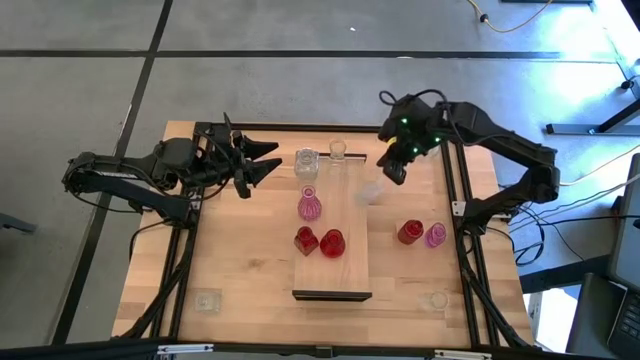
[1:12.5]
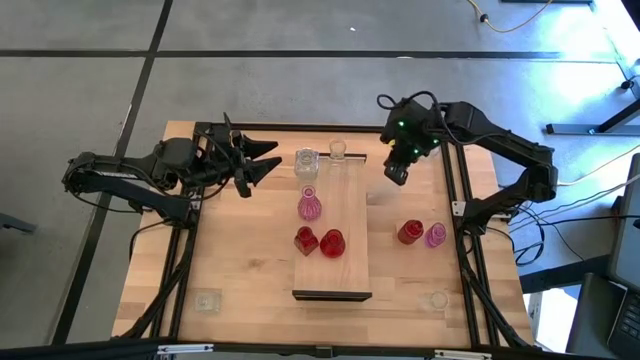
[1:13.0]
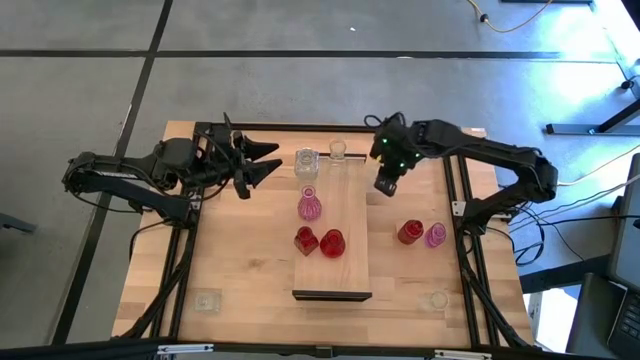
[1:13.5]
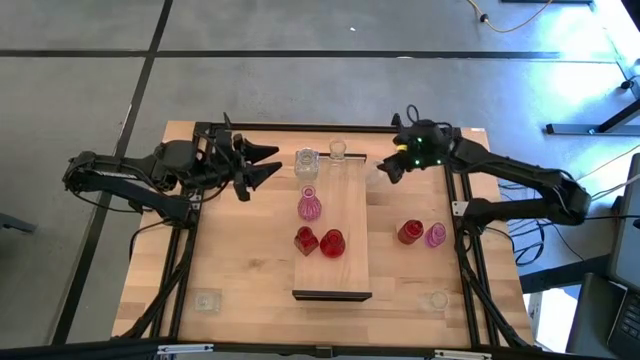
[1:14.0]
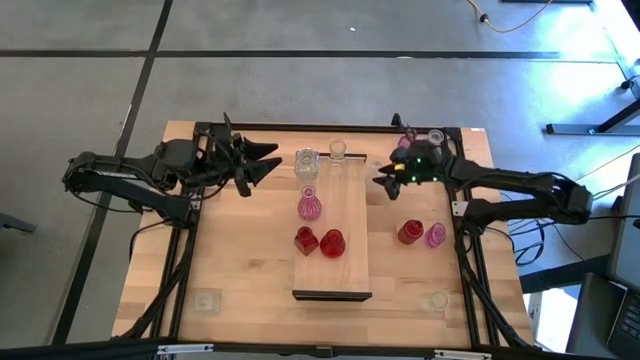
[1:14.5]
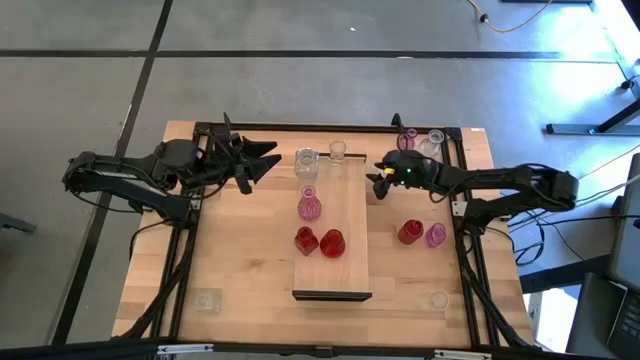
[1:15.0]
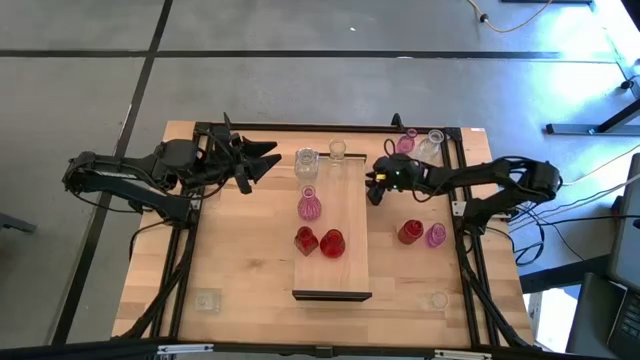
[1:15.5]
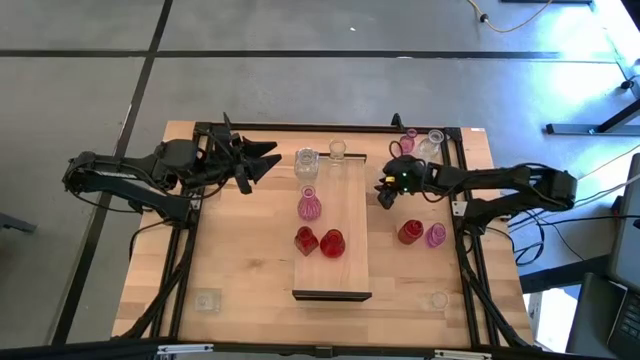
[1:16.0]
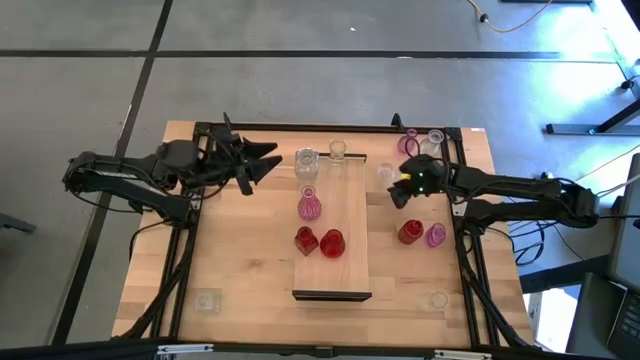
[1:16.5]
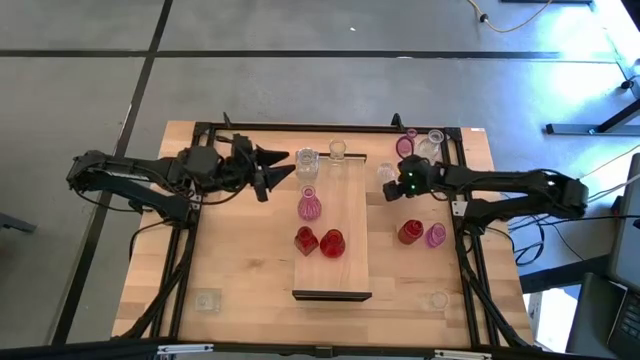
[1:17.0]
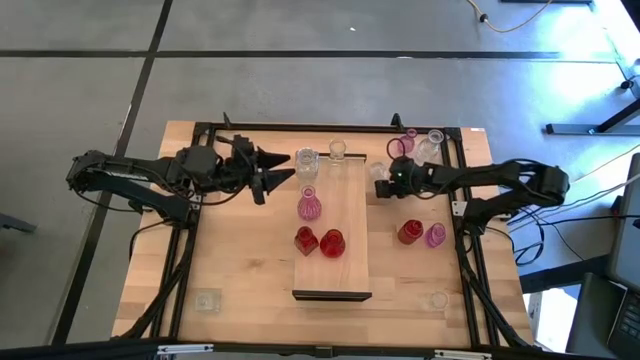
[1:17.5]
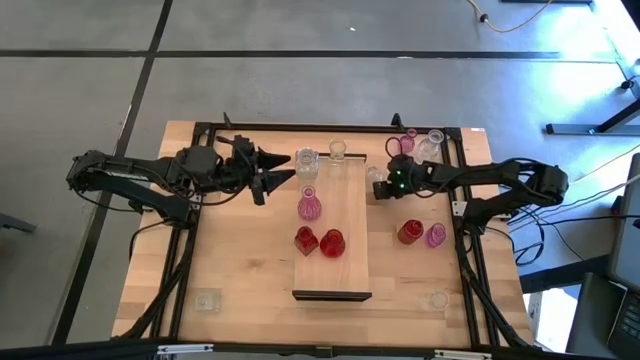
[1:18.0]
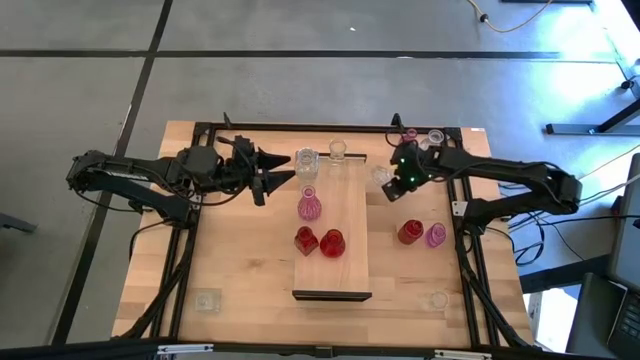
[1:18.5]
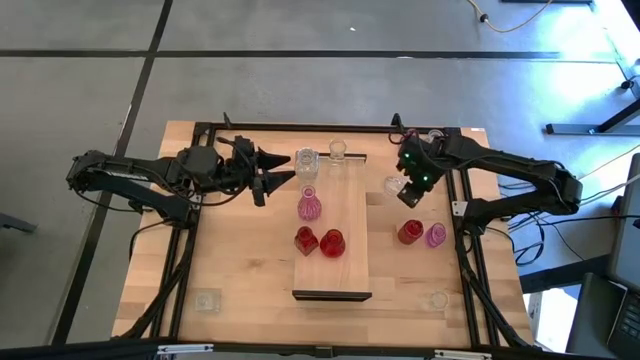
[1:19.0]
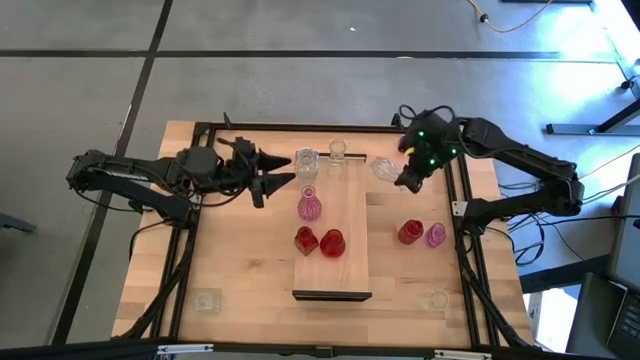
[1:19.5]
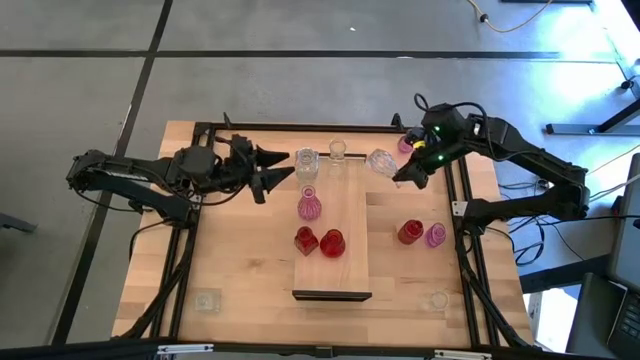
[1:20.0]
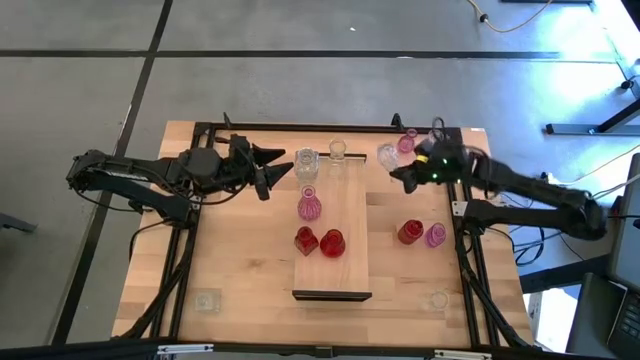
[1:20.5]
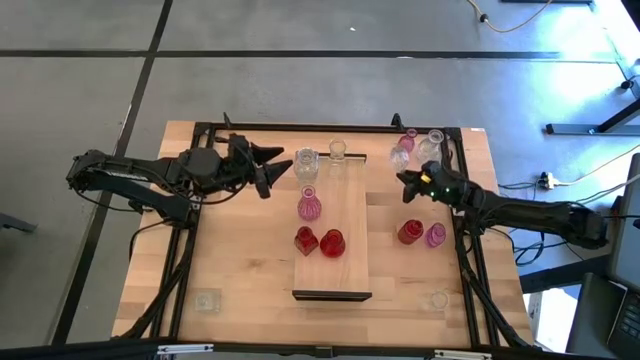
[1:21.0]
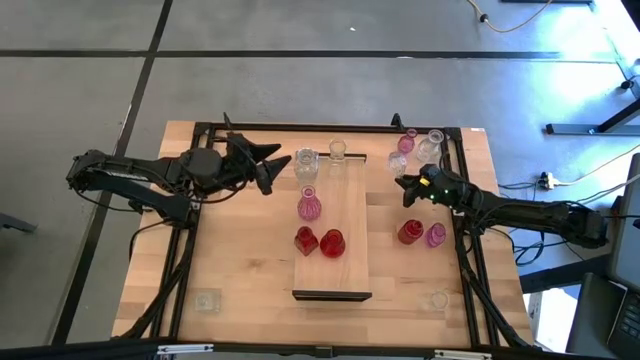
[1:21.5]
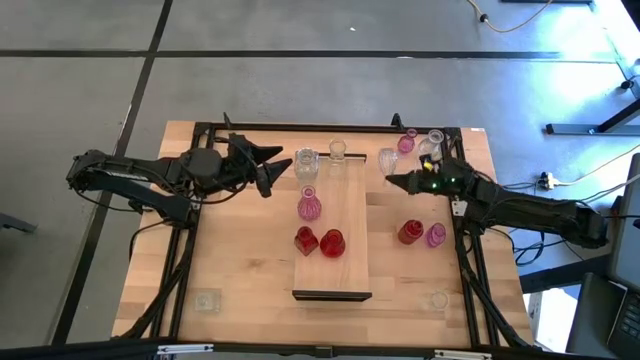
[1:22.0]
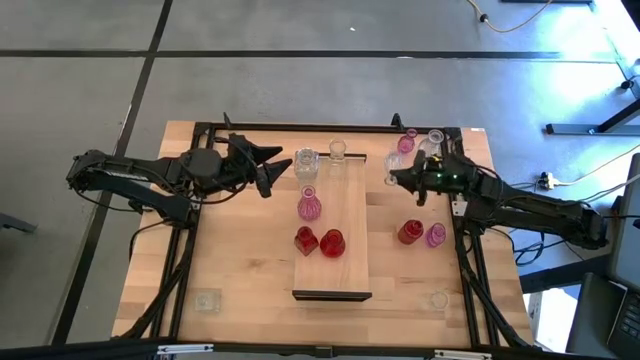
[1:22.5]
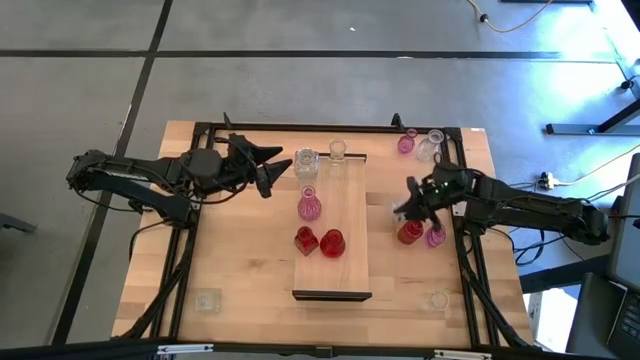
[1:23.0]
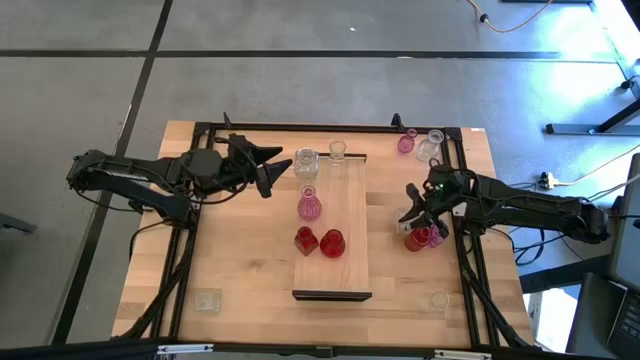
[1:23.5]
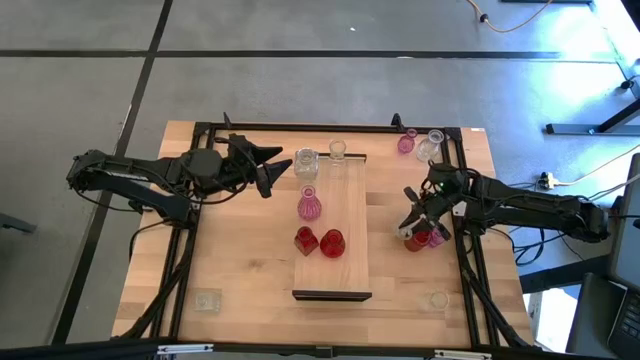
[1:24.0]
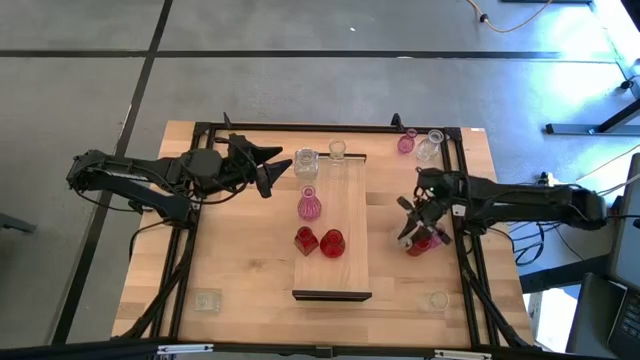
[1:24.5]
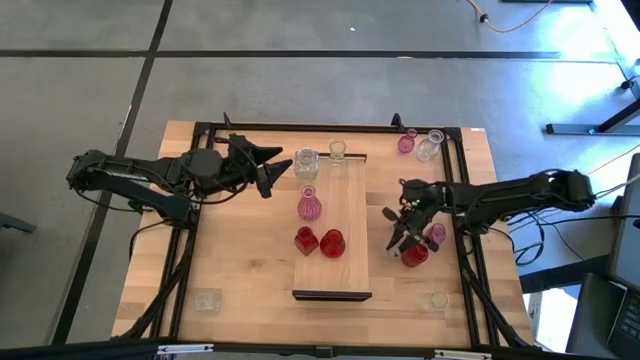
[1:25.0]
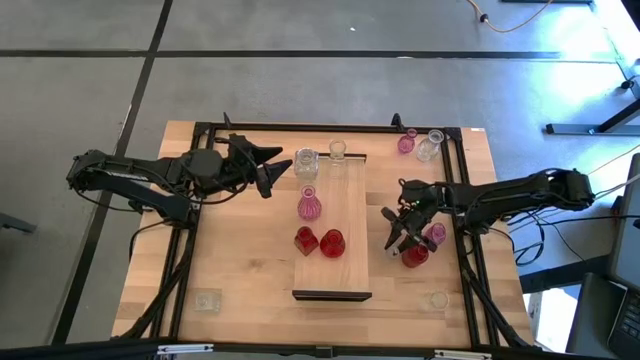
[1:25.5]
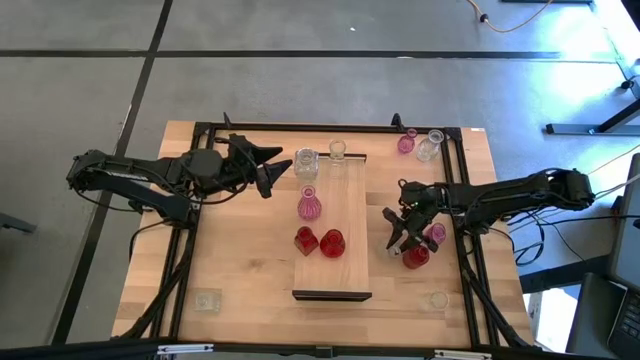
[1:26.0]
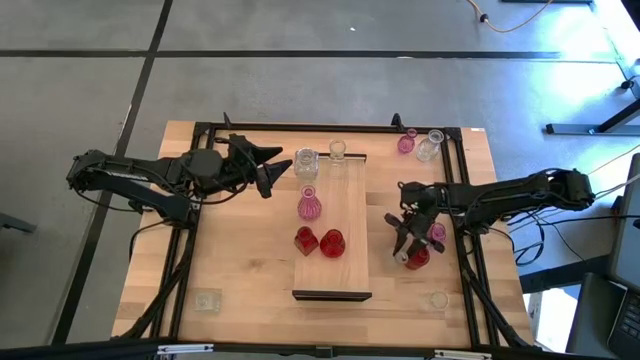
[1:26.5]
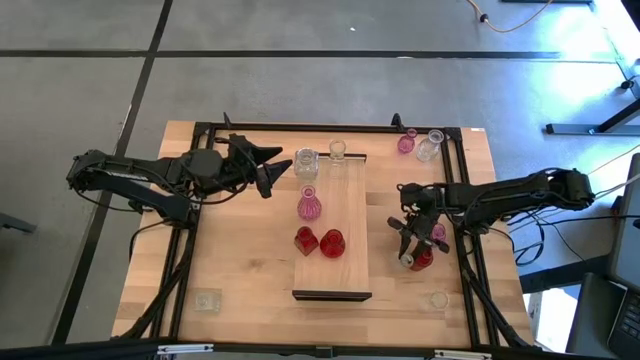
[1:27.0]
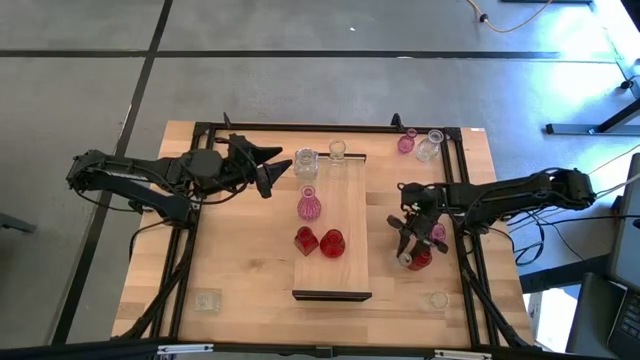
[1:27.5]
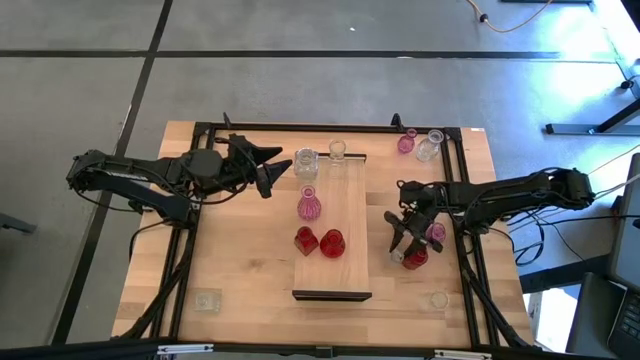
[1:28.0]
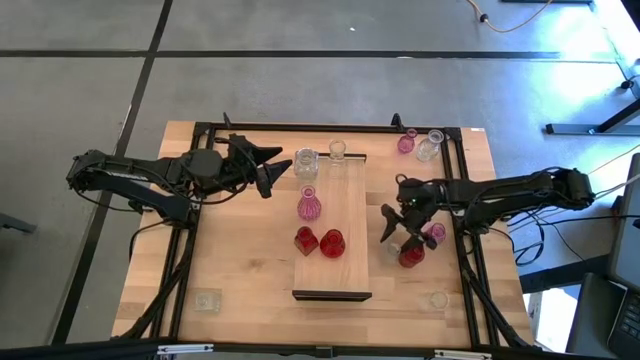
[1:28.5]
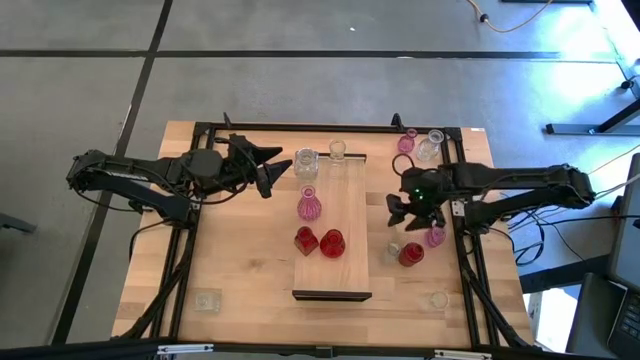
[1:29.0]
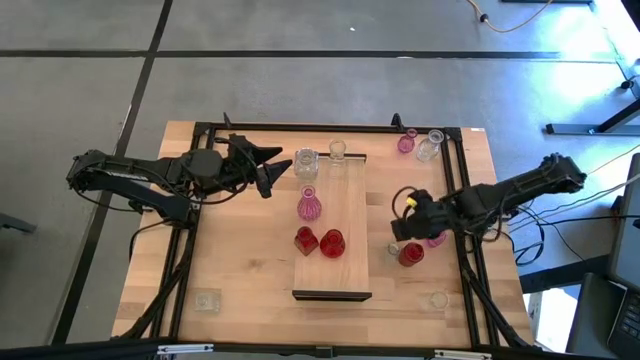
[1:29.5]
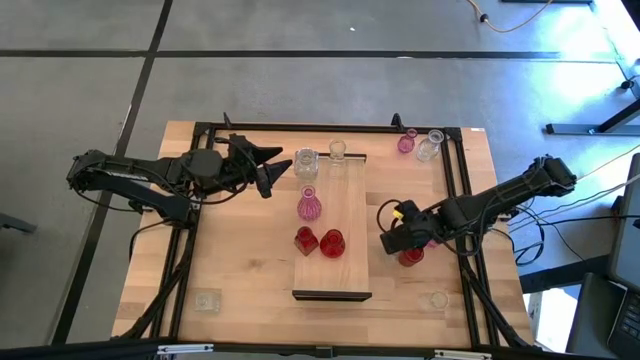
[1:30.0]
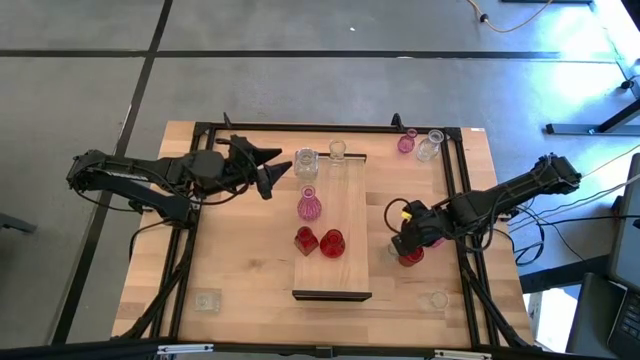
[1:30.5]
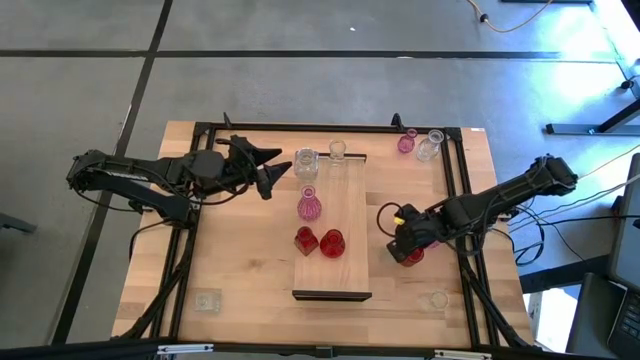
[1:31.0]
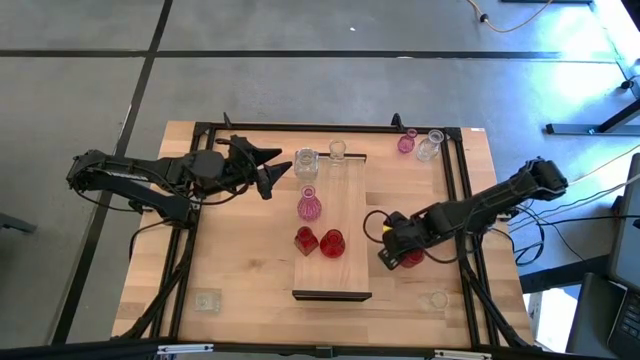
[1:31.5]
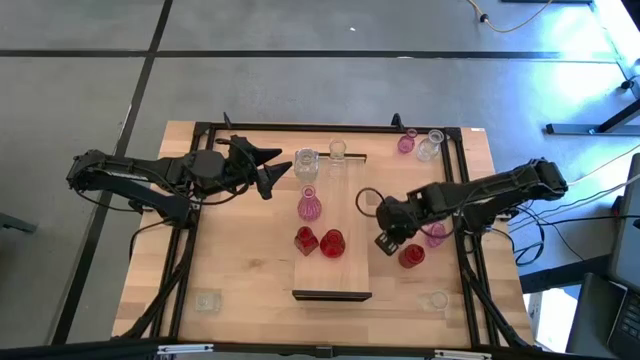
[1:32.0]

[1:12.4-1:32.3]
Task: sort vases onto shelf
Put the transparent vase on the shelf aligned with the other transparent vases
